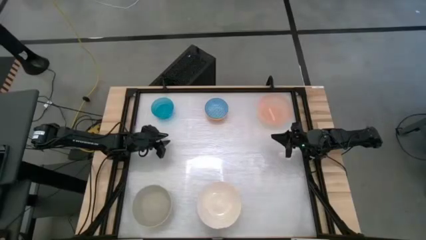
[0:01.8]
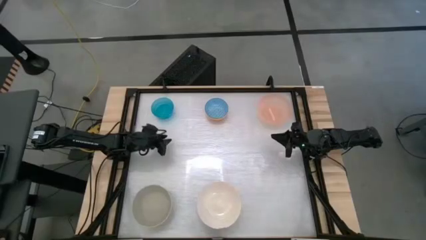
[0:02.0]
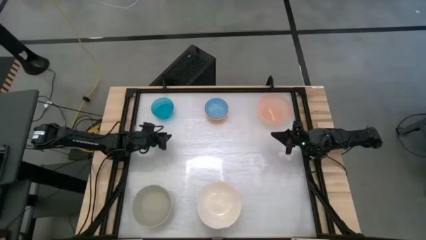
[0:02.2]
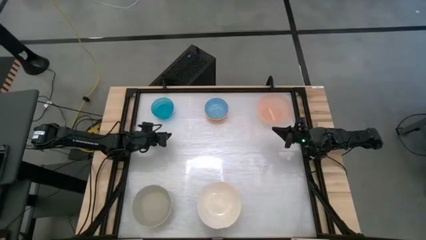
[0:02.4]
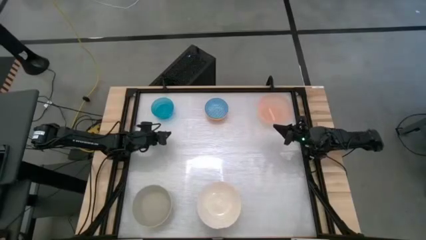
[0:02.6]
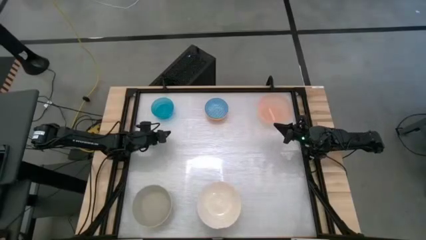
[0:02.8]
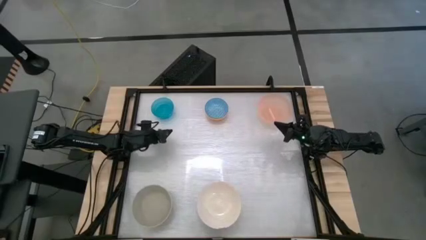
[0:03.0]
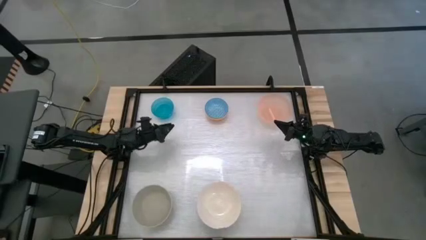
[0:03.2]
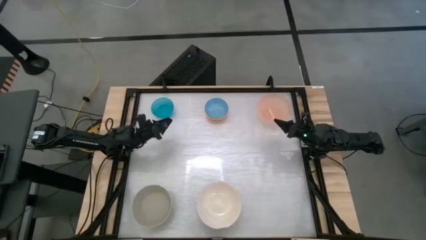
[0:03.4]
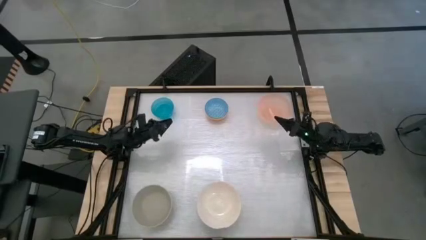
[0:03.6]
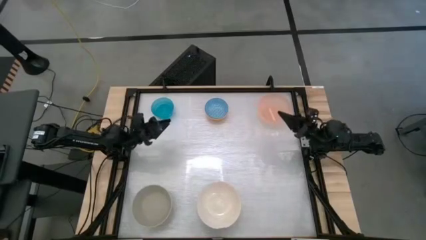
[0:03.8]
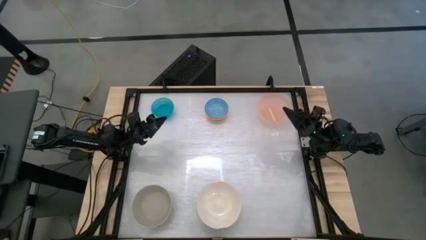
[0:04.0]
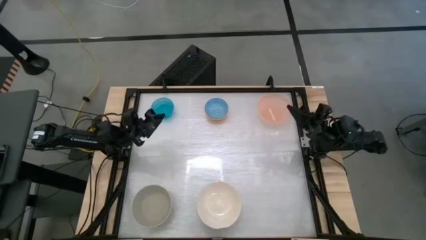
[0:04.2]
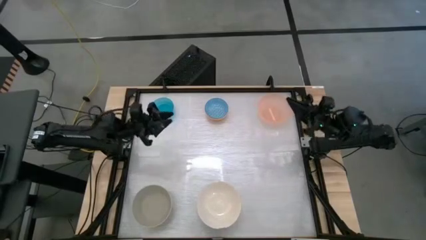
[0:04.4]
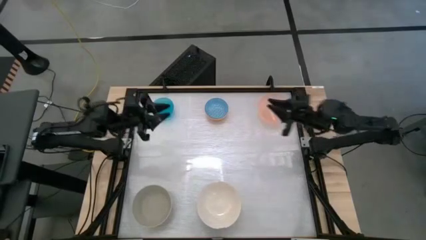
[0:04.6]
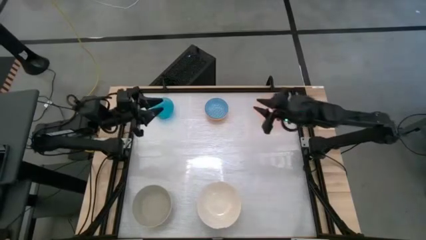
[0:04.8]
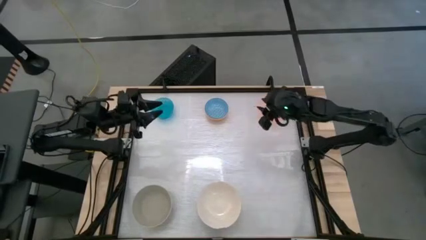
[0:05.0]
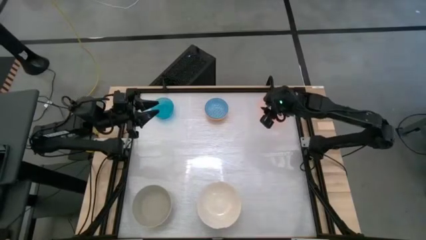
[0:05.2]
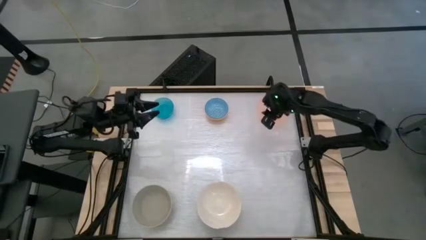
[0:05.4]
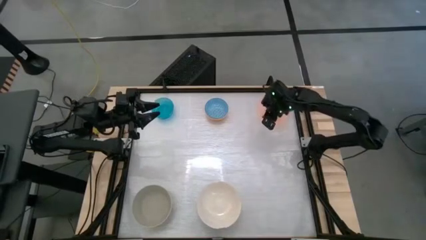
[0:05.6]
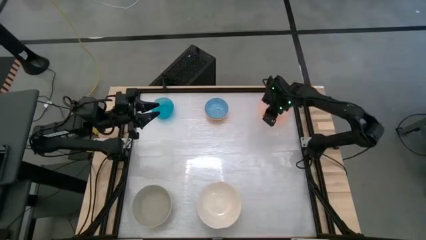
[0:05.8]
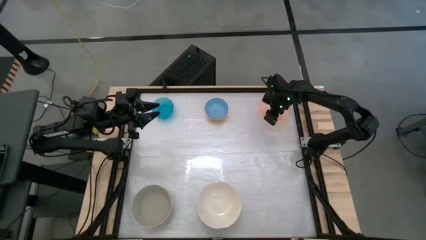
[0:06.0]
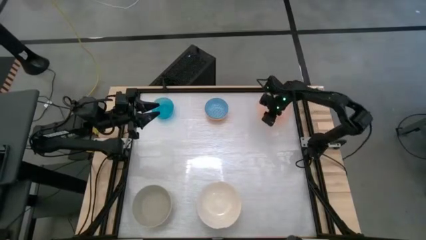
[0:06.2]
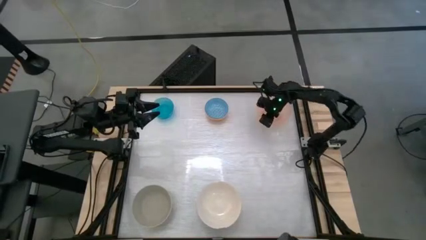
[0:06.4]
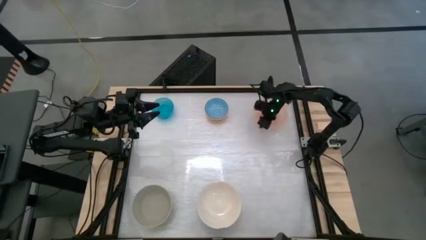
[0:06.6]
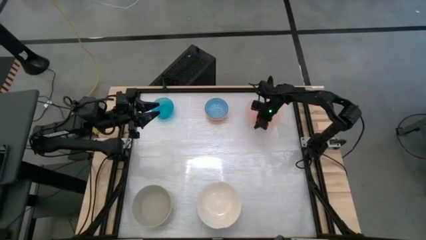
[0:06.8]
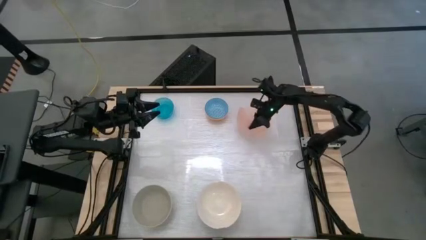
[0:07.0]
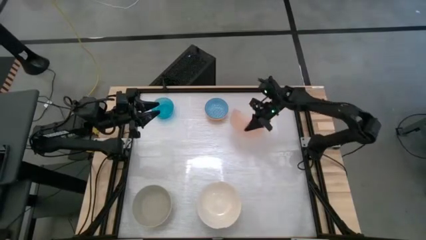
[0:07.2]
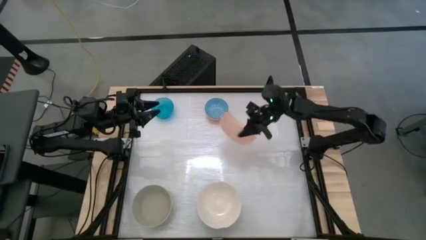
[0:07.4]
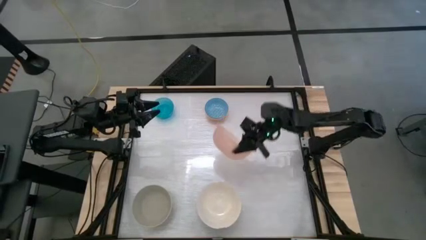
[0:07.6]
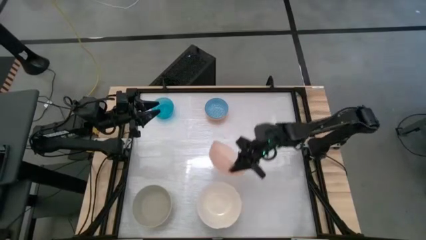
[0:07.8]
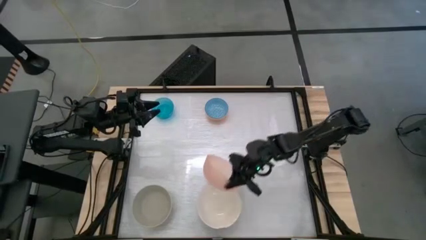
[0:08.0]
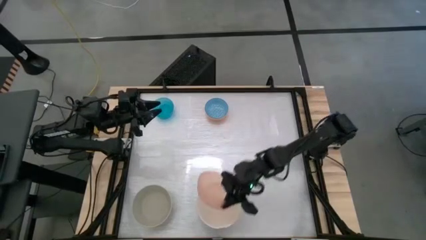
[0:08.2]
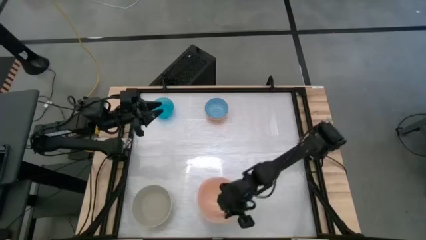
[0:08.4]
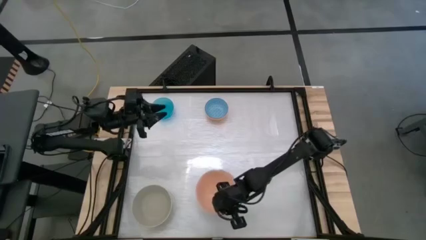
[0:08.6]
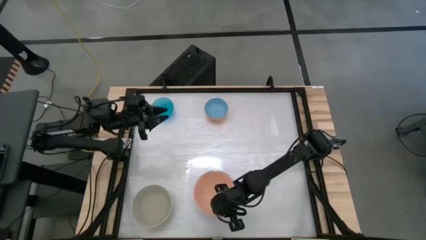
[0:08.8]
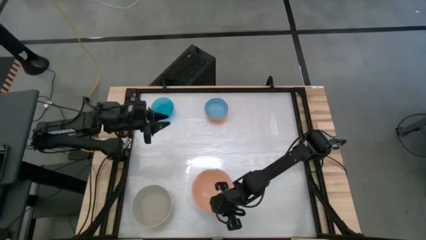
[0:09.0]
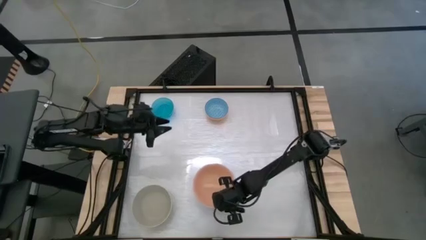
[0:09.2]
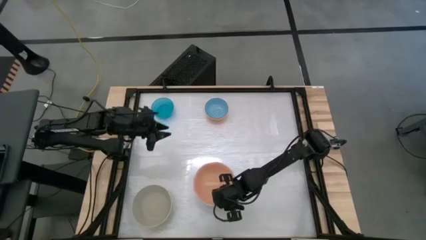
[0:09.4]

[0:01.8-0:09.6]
Stack the light orange bowl on top of the white bowl

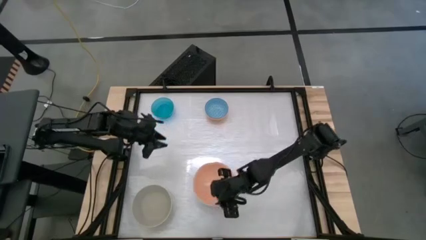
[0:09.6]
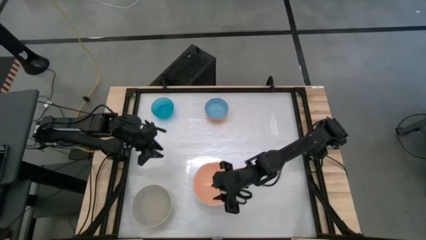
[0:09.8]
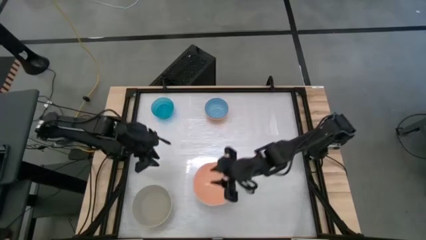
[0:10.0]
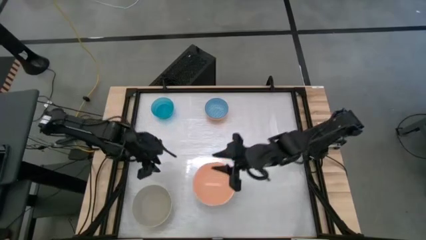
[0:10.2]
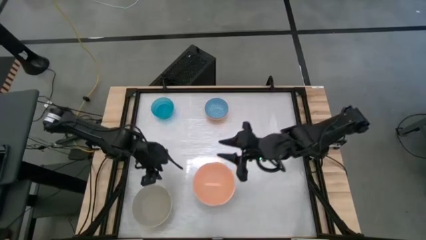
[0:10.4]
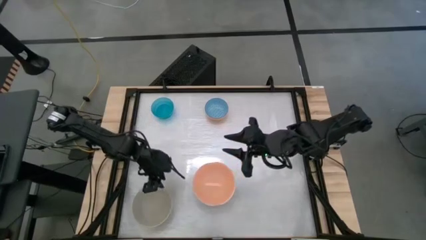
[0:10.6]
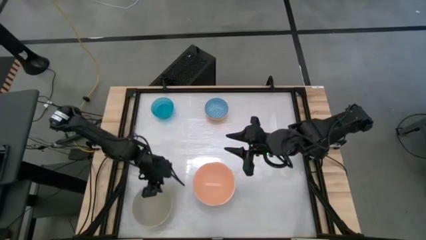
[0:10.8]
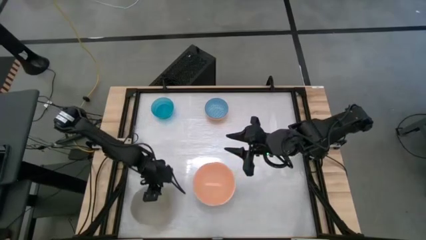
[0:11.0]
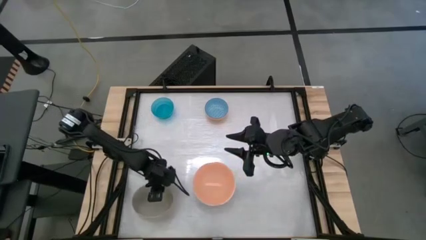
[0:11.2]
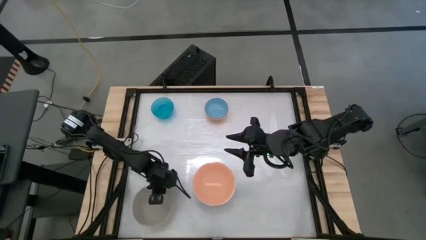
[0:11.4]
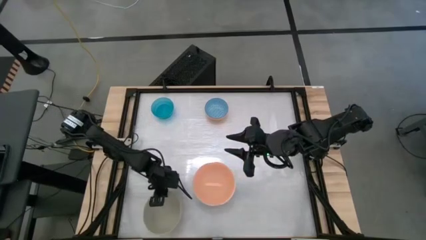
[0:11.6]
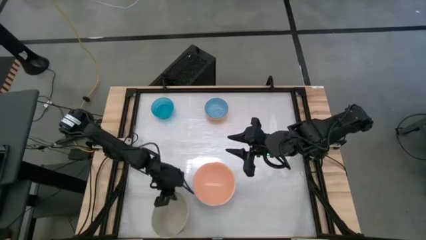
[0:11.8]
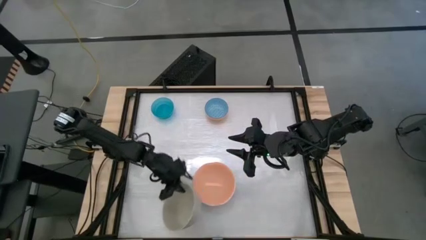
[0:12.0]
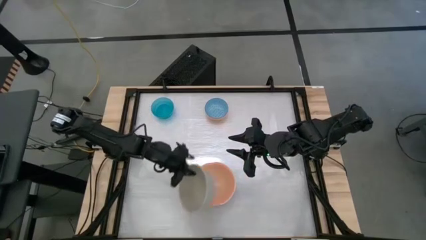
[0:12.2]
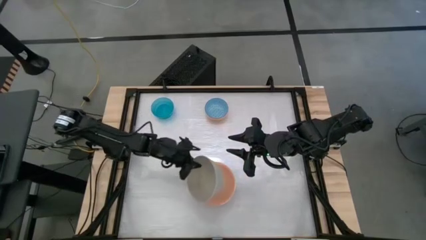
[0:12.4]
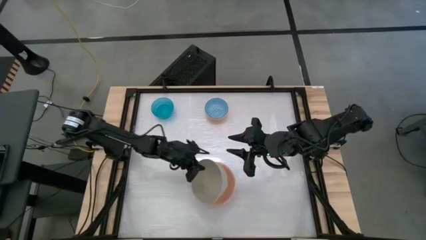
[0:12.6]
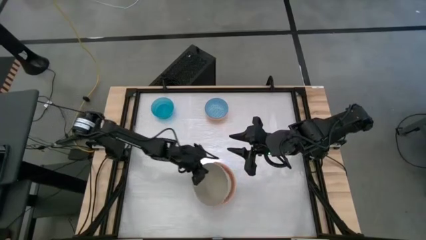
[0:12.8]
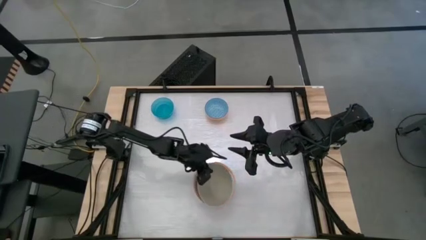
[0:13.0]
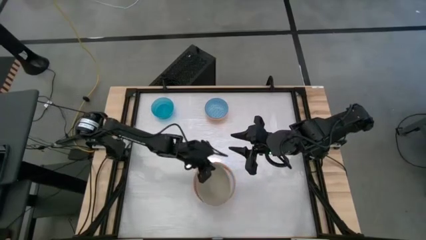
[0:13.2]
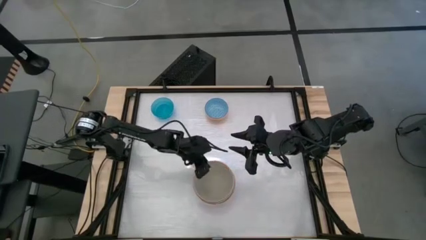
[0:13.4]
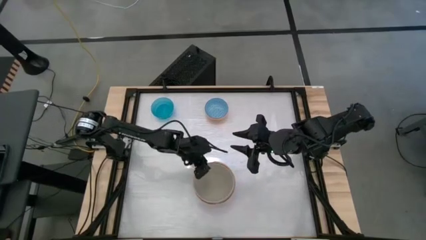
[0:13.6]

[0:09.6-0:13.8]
Stack the gray bowl on top of the light orange bowl

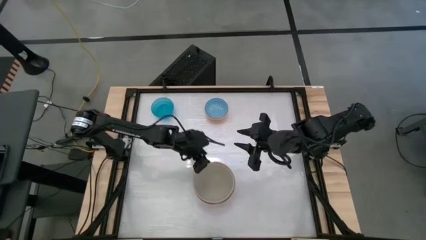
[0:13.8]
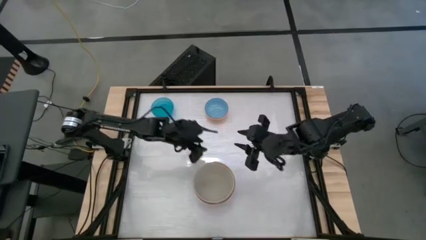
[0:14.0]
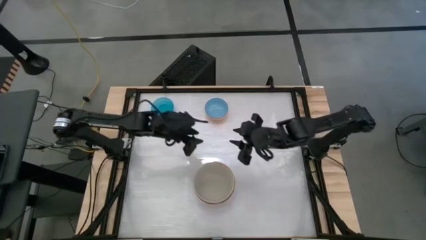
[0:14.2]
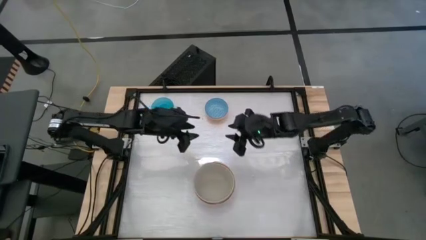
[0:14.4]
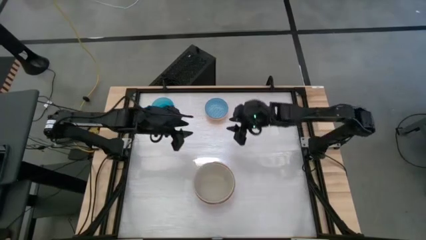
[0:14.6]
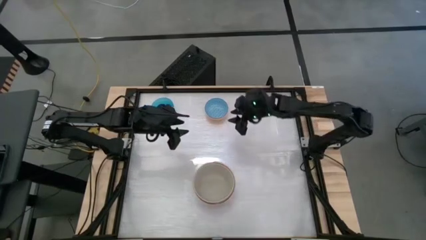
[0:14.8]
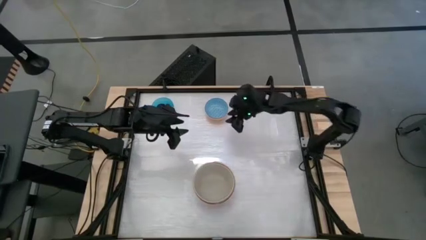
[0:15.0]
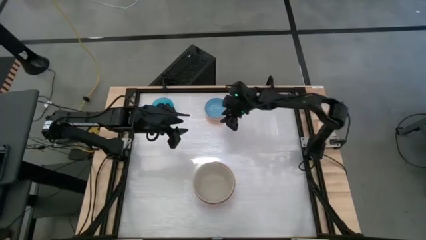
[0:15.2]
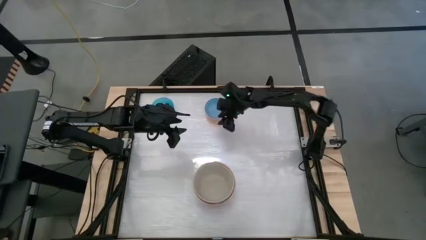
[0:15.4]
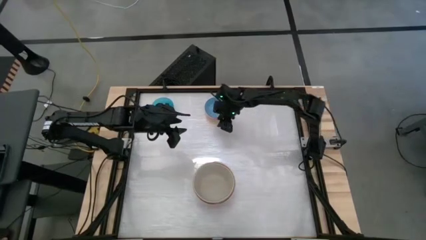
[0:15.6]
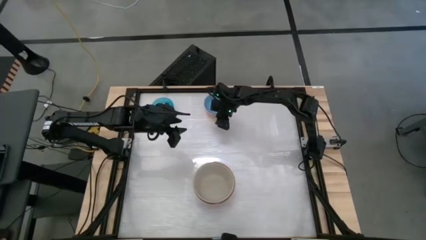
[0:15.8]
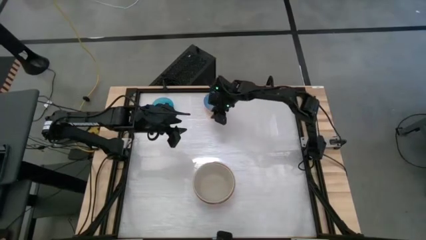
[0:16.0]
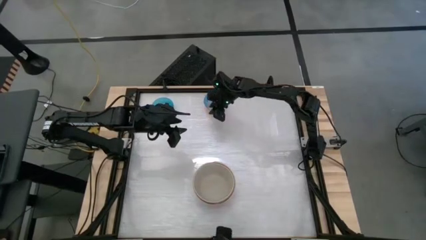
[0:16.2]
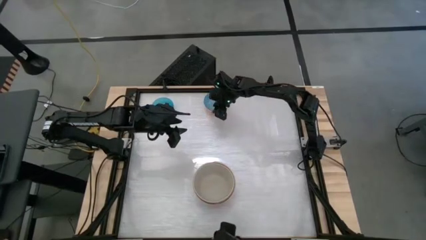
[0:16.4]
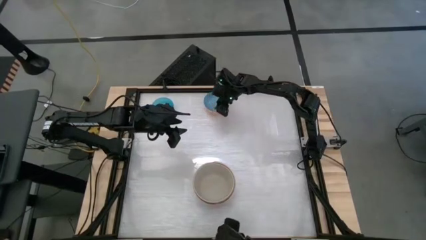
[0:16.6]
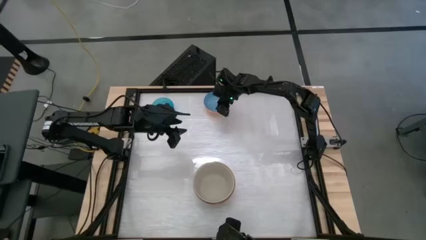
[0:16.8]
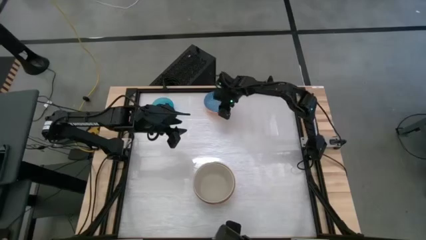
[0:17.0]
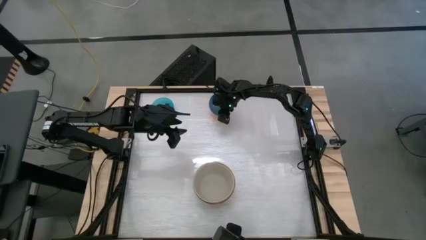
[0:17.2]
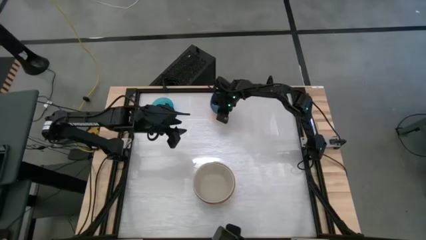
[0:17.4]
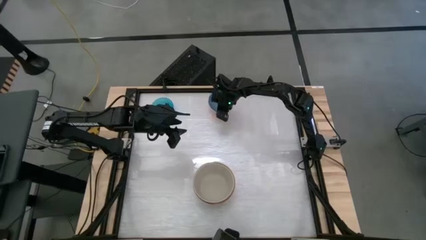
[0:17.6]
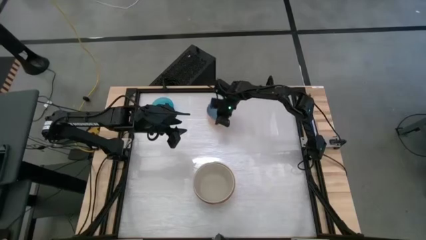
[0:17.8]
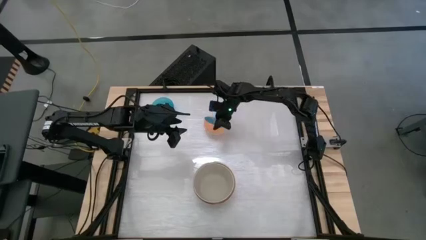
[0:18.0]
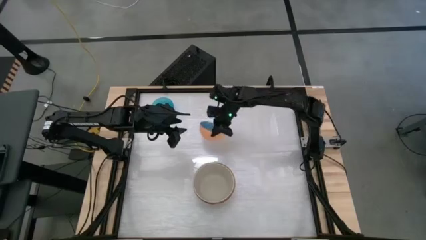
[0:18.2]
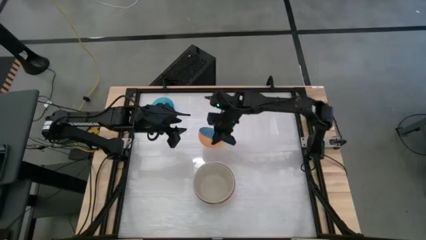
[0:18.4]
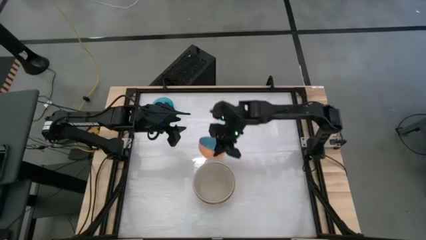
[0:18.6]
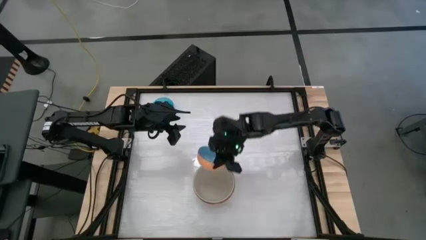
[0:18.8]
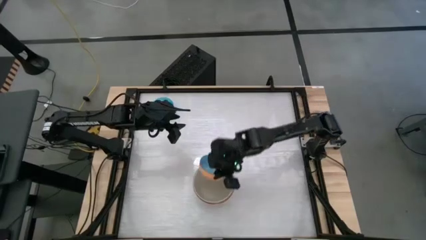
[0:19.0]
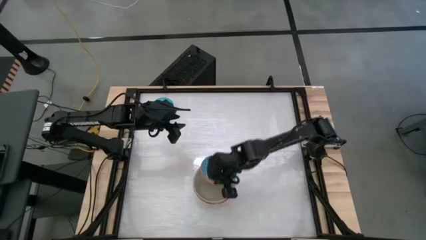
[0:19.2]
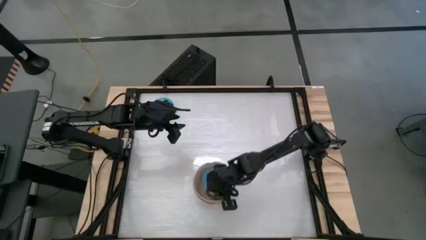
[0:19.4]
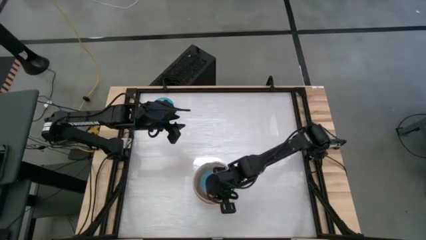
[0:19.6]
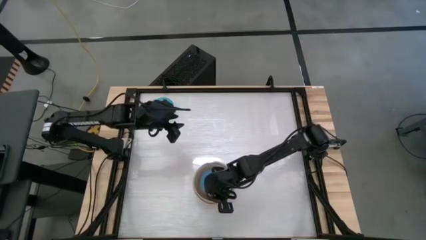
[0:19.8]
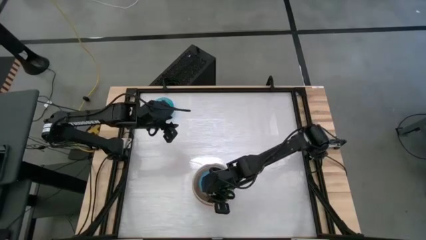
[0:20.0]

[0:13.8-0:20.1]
Stack the orange bowl on top of the gray bowl
